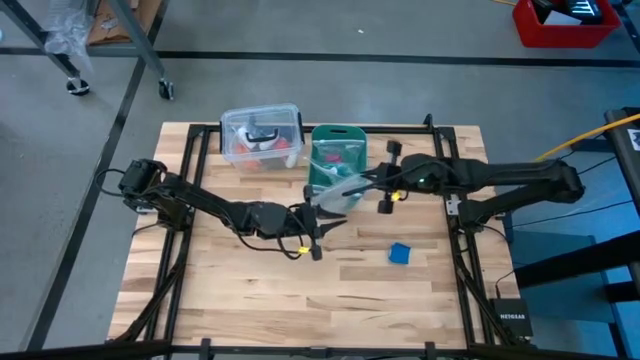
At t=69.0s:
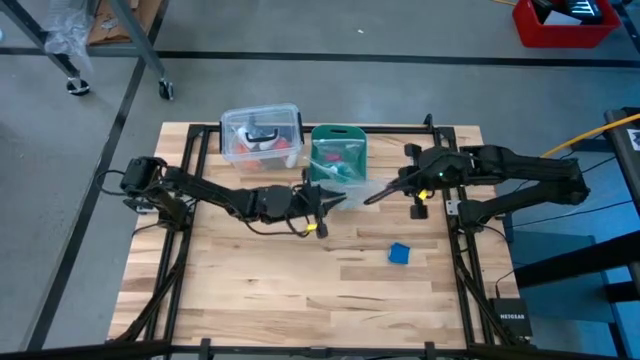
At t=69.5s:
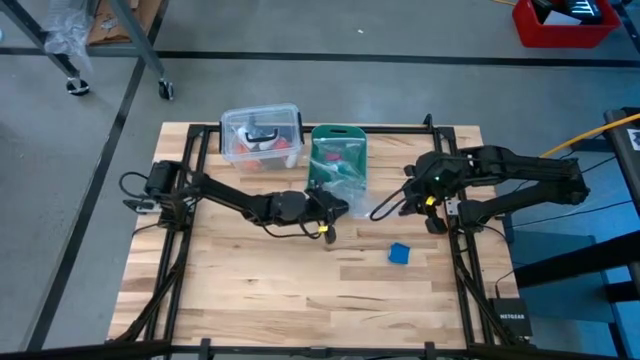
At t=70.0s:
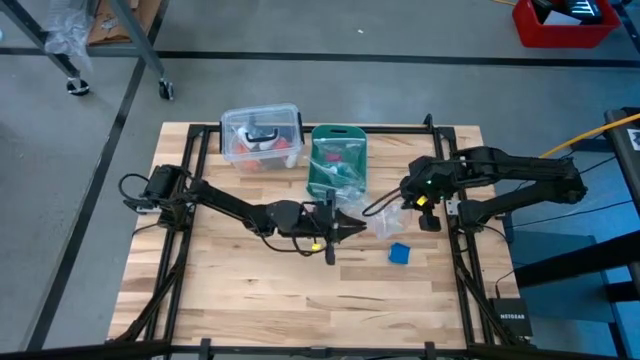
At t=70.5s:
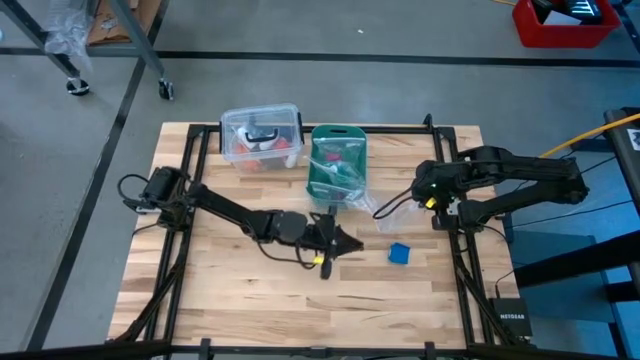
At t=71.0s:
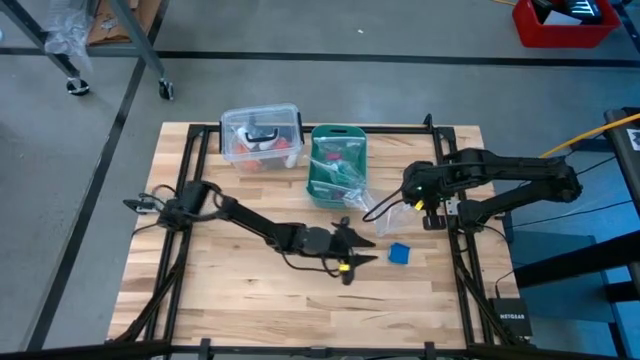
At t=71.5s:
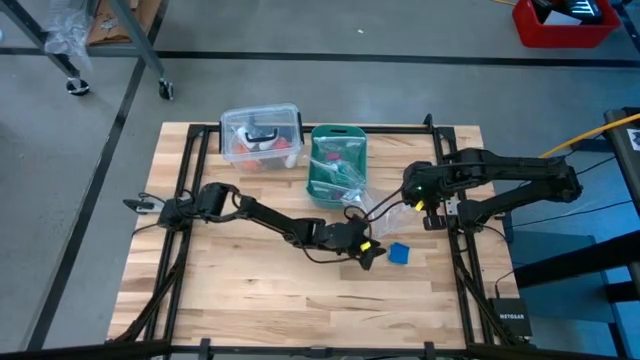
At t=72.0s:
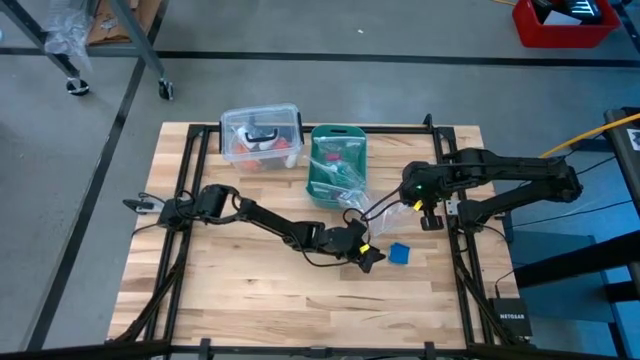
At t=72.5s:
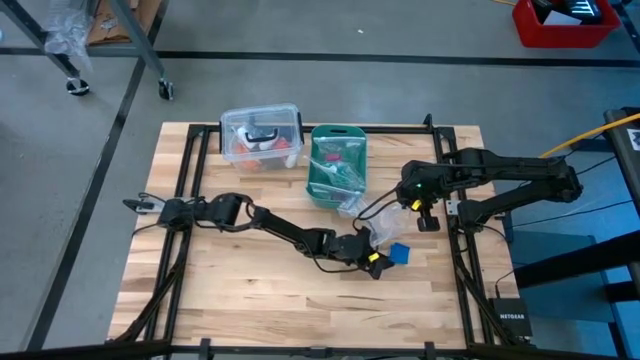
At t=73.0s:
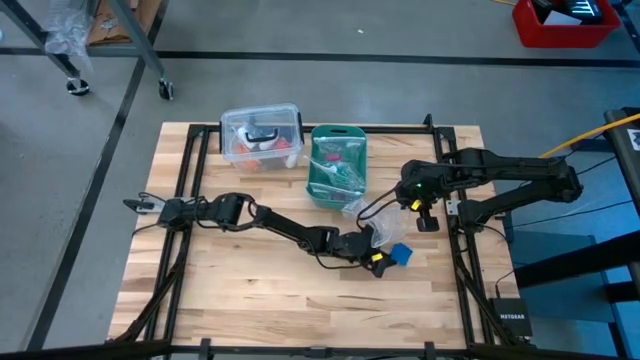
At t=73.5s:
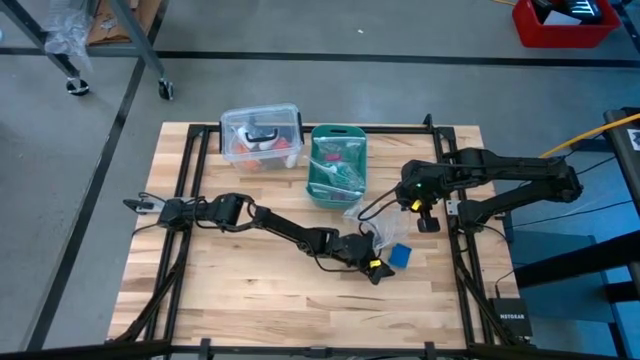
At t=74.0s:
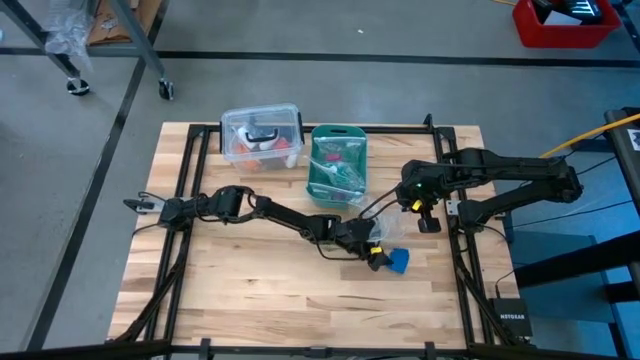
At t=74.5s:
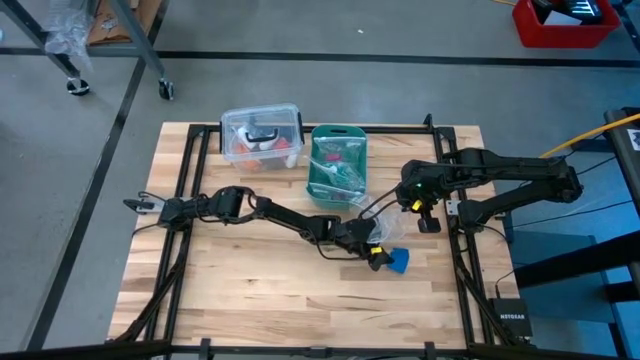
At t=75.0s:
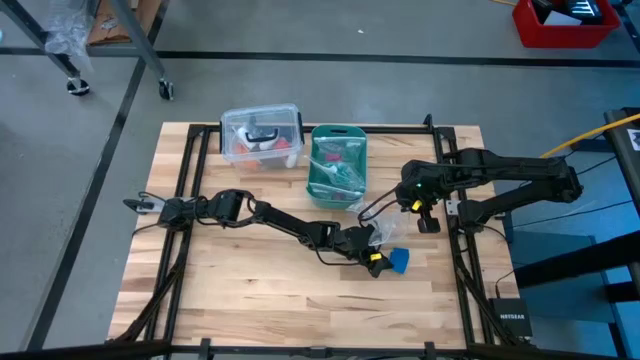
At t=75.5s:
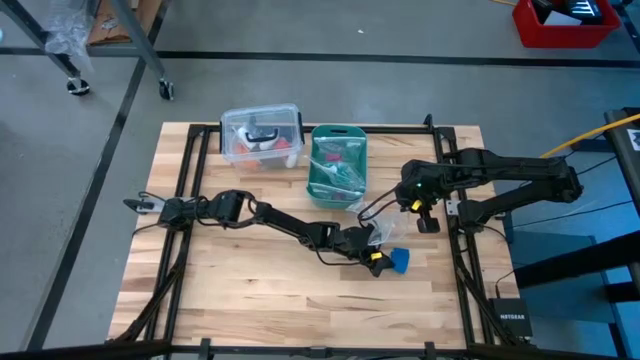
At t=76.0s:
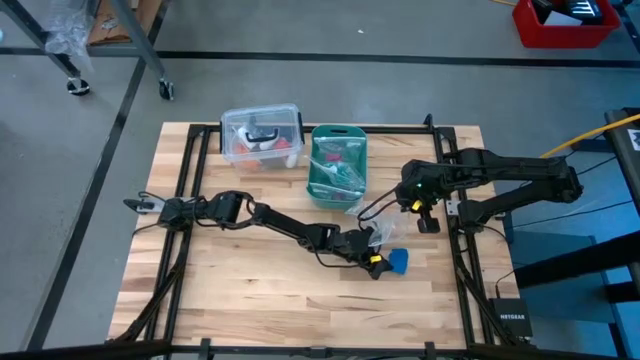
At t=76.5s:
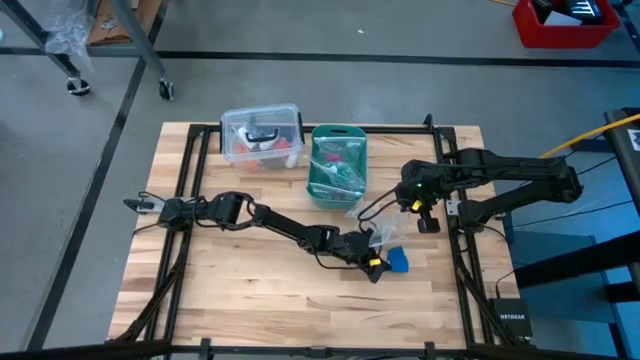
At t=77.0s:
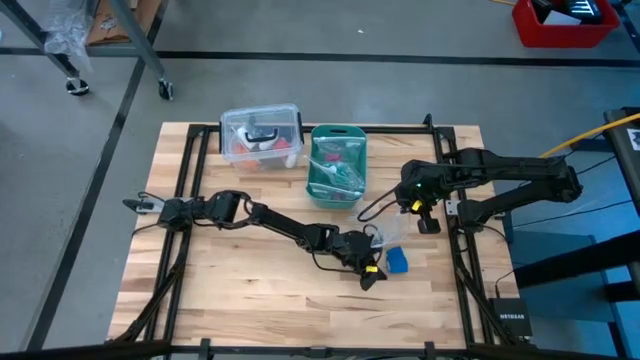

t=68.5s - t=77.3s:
Task: Roll bandage
Put the blue bandage into the transparent zip bag

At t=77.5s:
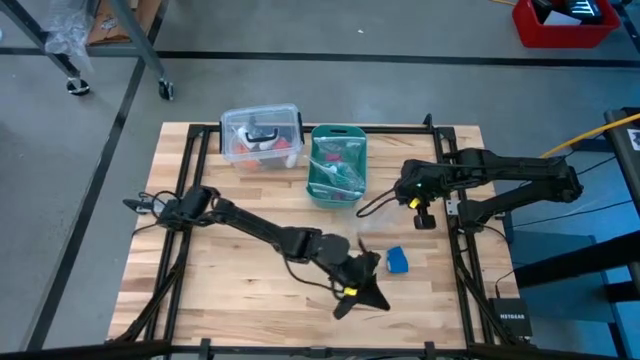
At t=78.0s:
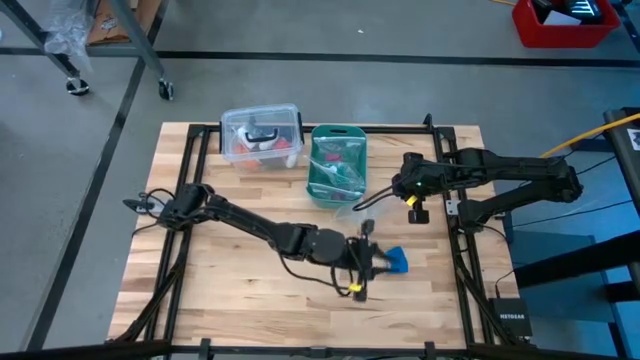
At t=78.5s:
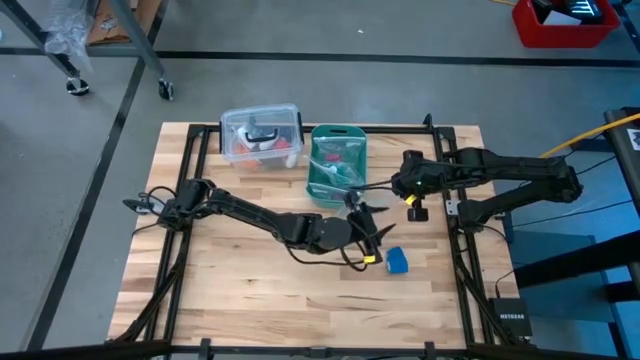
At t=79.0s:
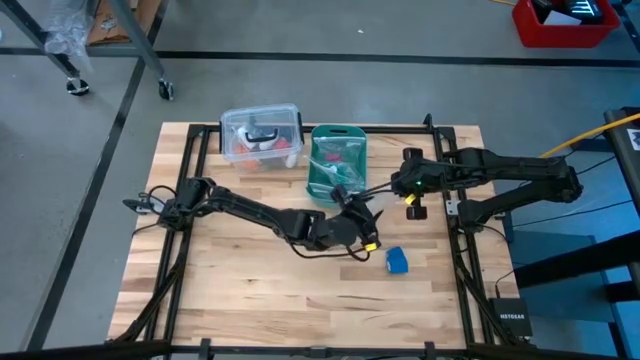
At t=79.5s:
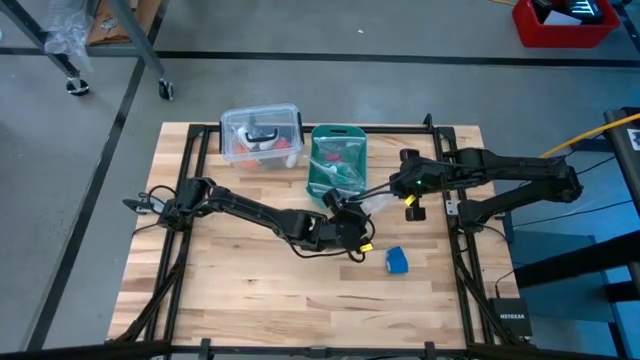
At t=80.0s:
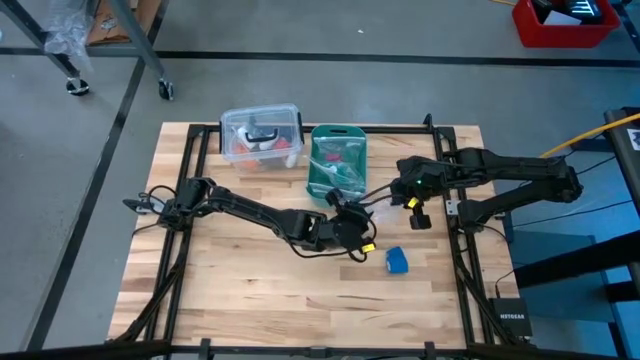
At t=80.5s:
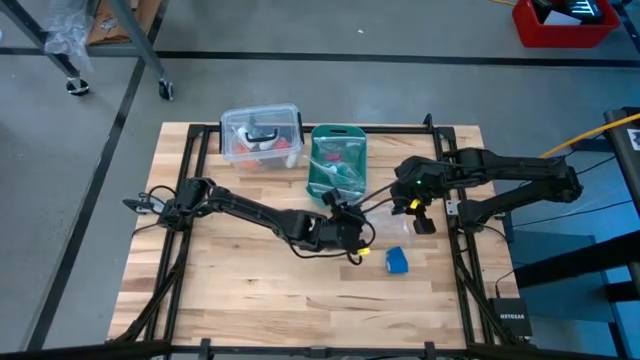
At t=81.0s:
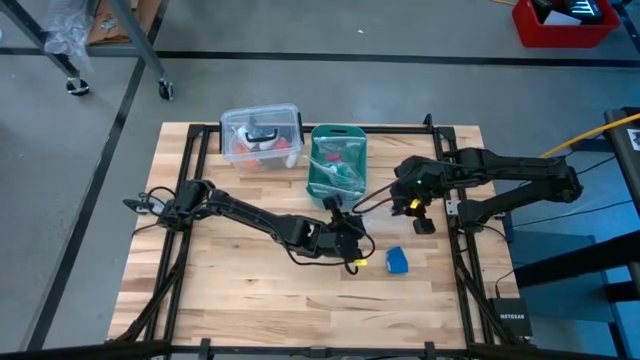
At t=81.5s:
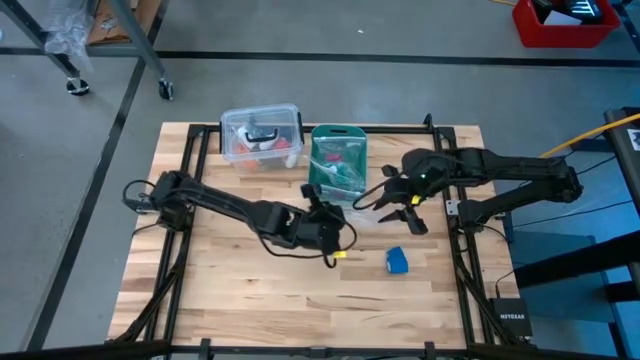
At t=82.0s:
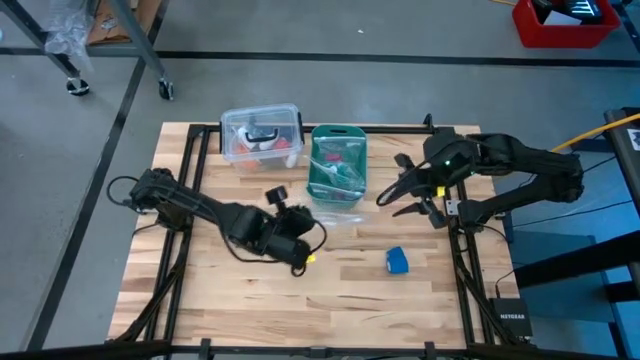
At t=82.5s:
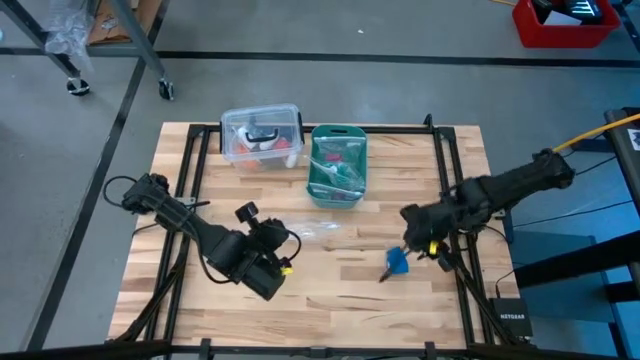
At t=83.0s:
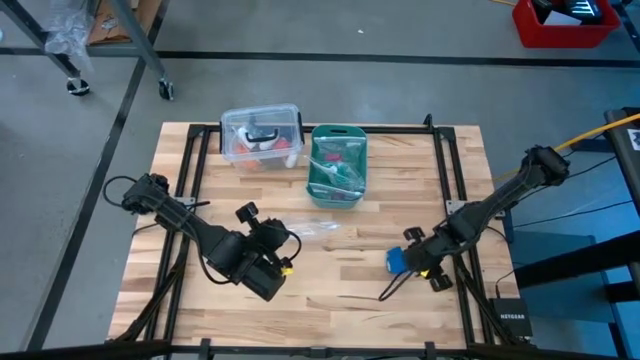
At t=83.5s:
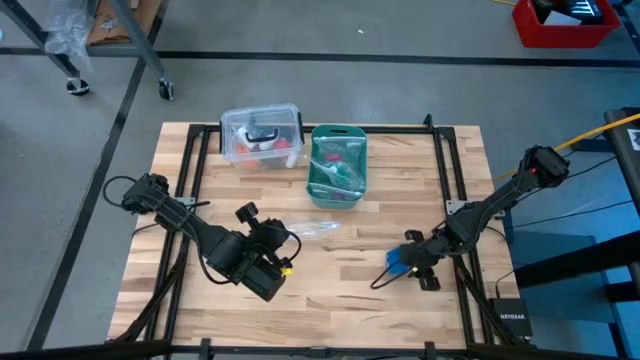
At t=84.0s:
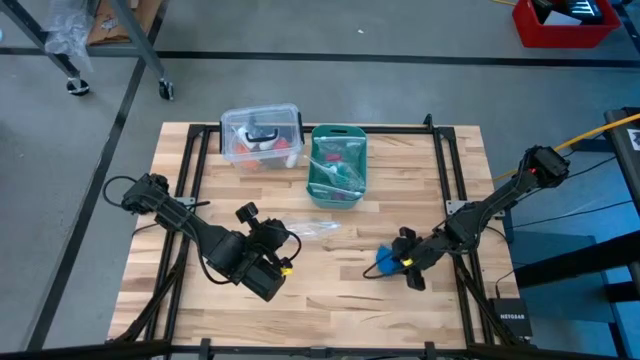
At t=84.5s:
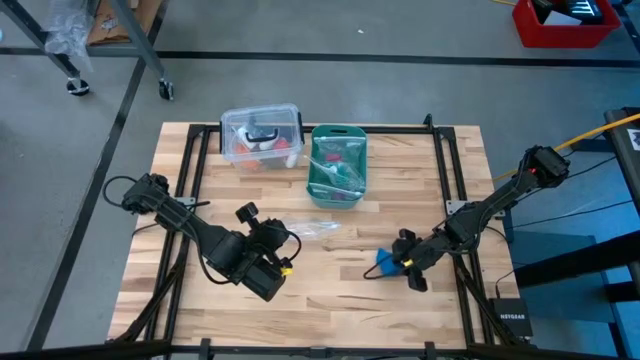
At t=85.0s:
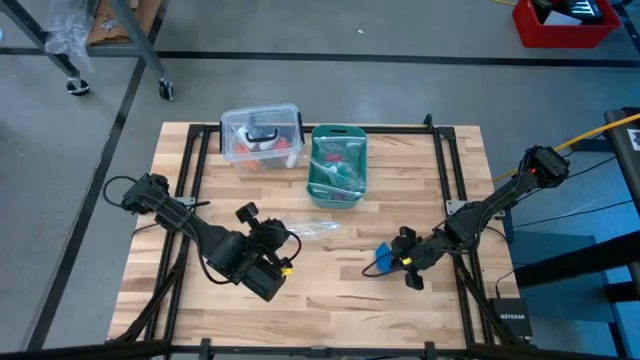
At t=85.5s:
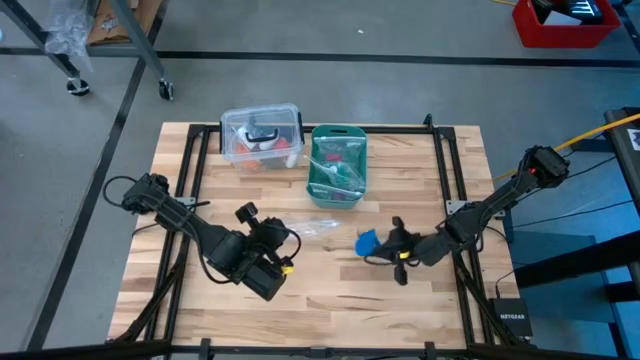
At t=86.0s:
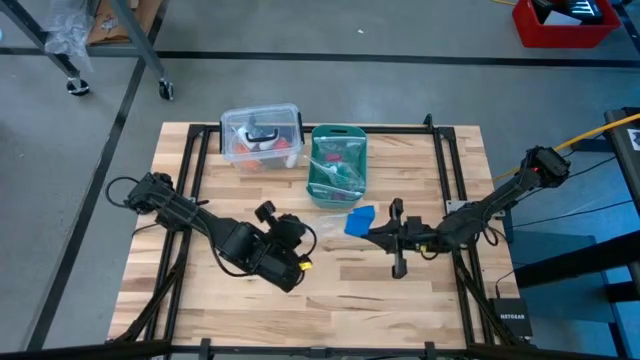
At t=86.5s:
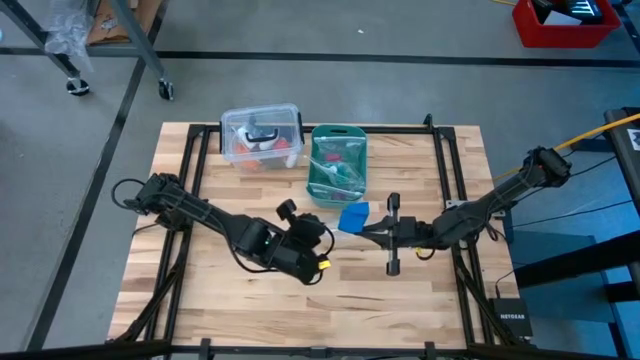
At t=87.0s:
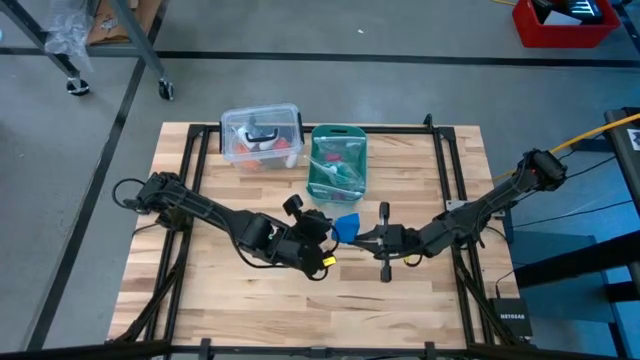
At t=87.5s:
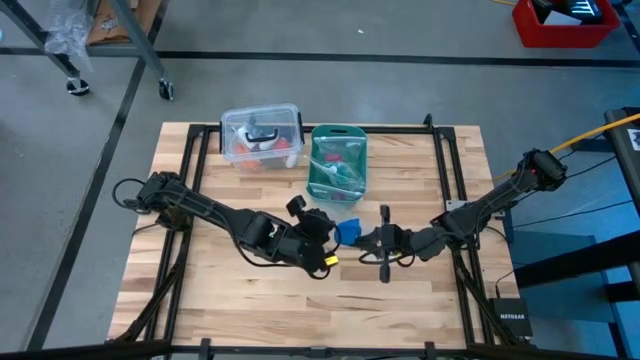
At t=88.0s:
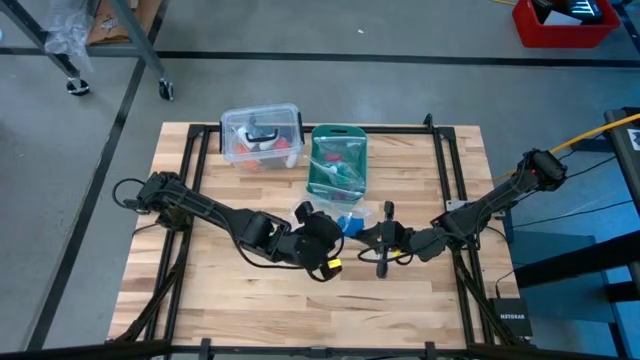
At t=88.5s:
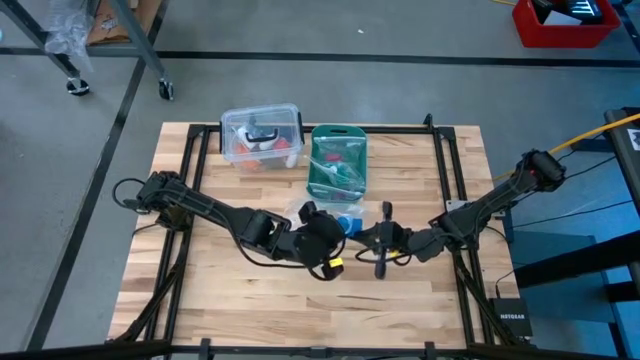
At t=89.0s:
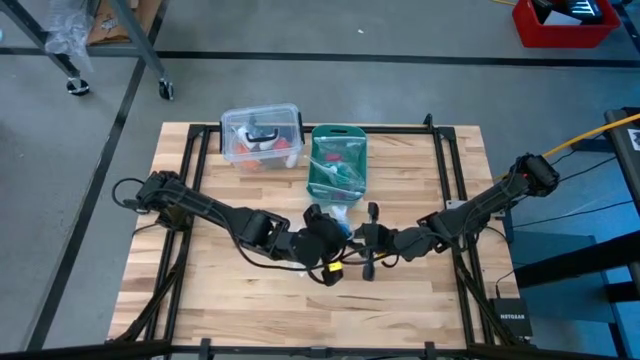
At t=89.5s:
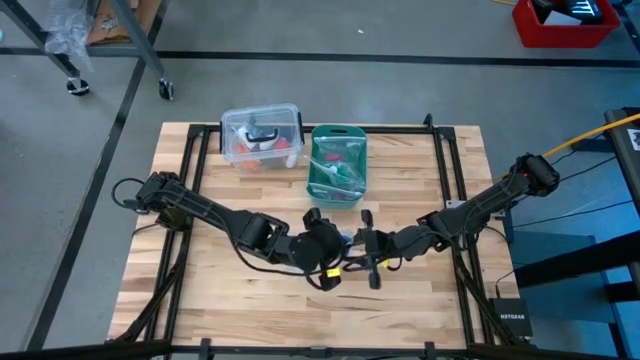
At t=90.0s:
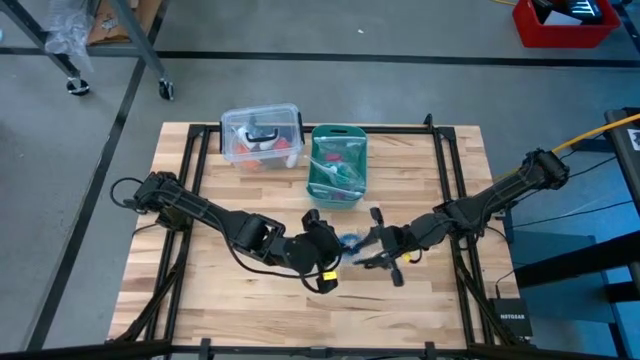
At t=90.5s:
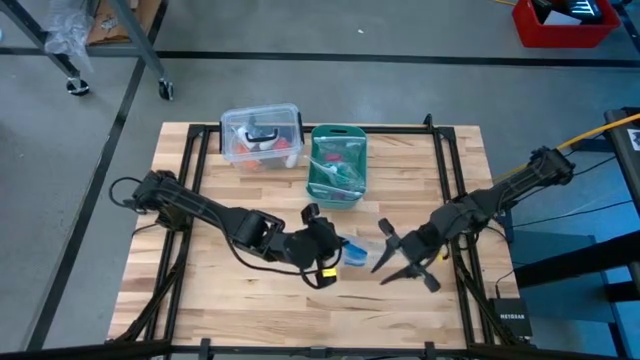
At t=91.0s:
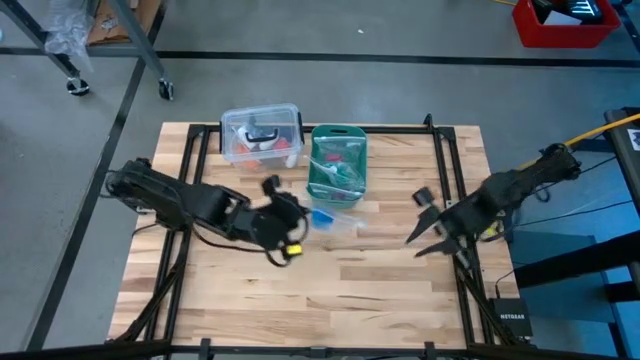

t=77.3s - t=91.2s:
Put the blue bandage into the transparent zip bag
